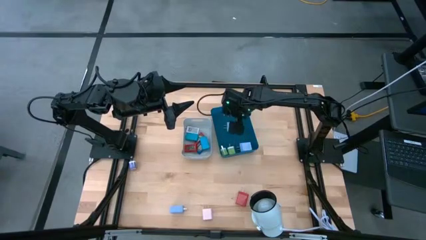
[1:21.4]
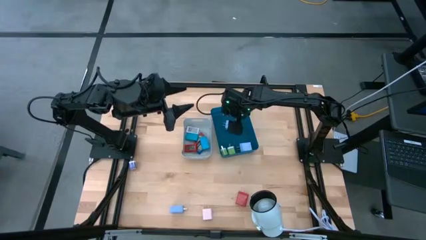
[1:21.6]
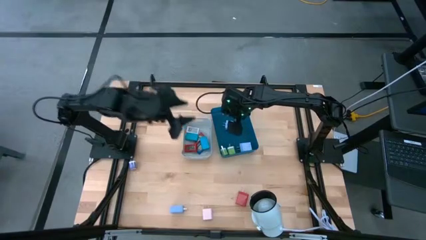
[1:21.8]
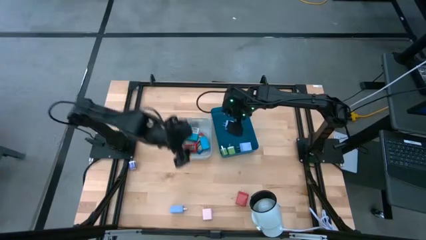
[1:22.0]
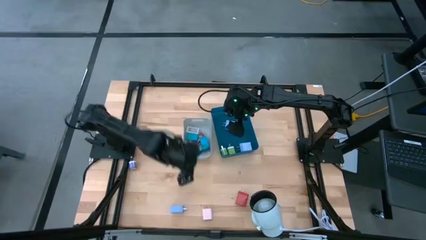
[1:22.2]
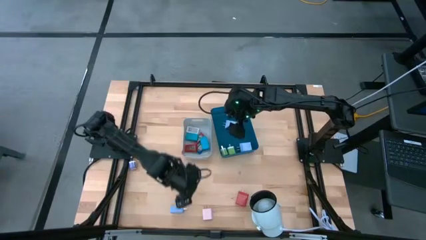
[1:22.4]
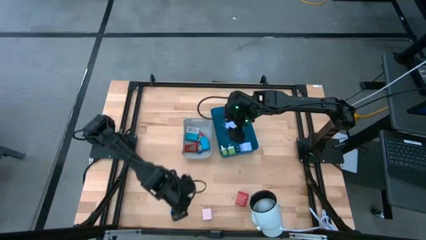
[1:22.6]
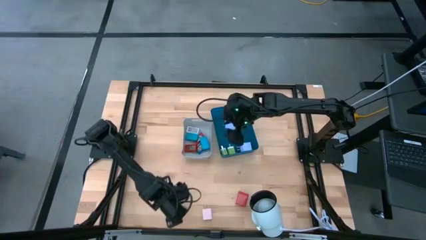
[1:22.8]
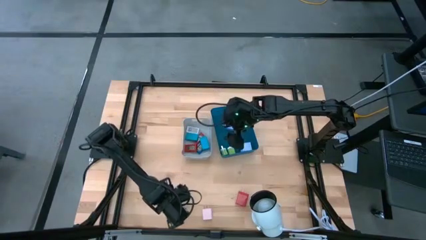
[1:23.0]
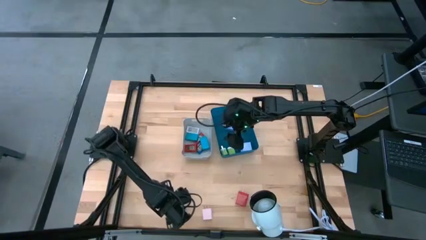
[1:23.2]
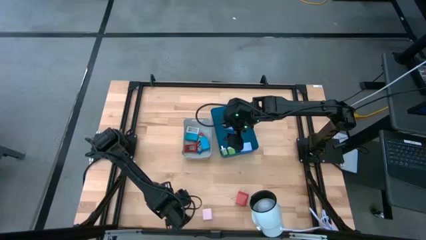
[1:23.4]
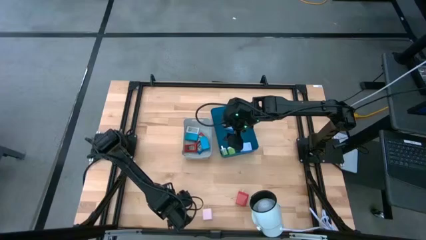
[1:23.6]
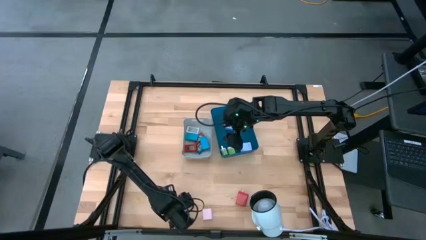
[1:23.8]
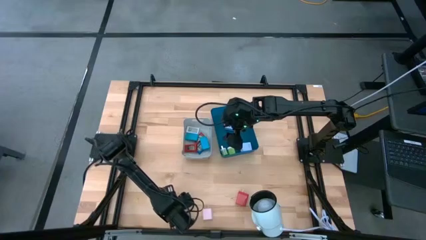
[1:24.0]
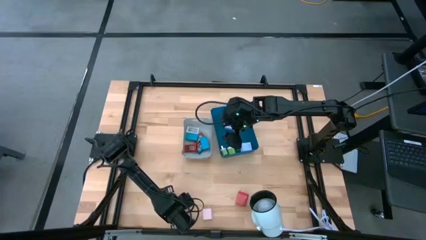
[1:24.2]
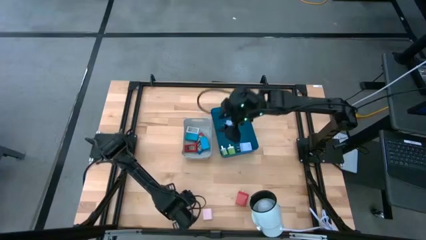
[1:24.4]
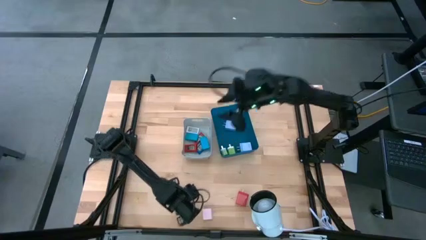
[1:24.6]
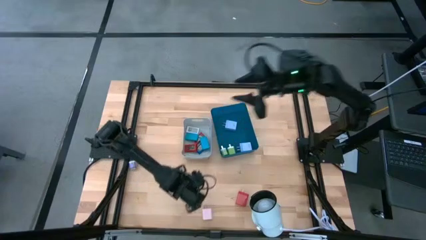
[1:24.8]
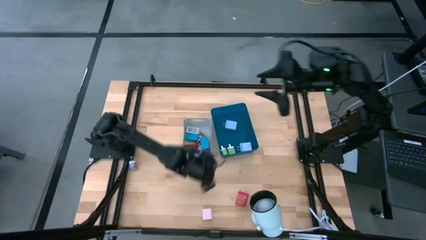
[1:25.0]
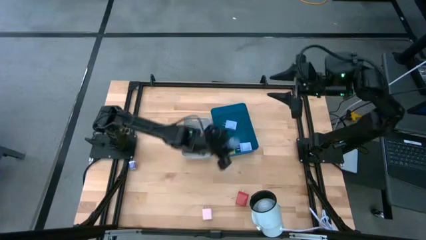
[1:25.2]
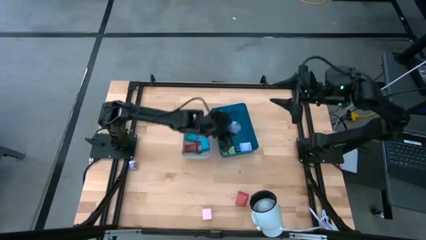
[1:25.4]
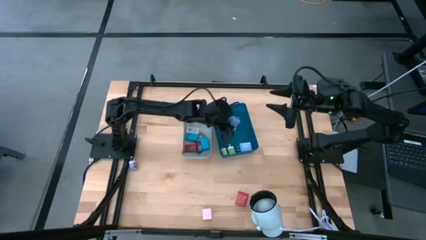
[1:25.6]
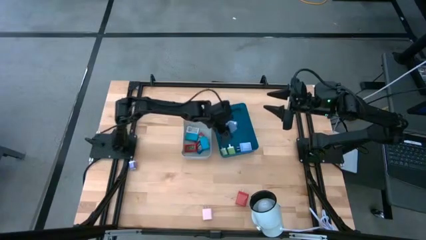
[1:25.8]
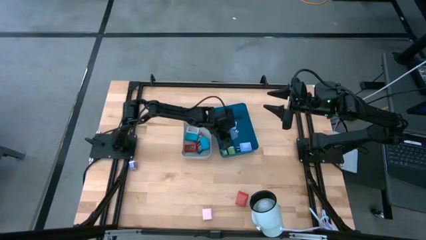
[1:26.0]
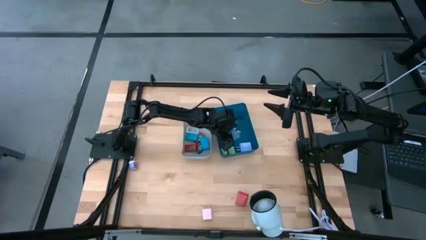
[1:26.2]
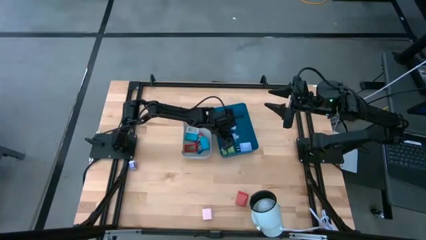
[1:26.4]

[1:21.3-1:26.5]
Task: Pick & Place Office items
Put the light blue charger adapter into the blue bin

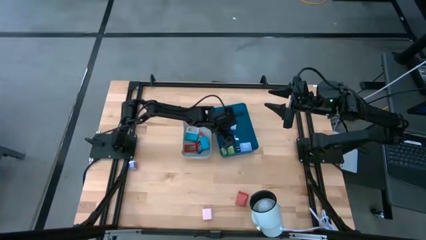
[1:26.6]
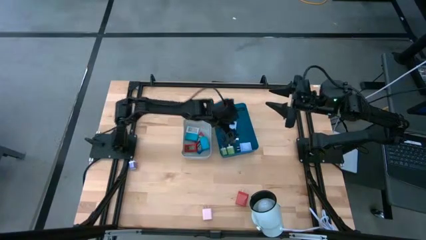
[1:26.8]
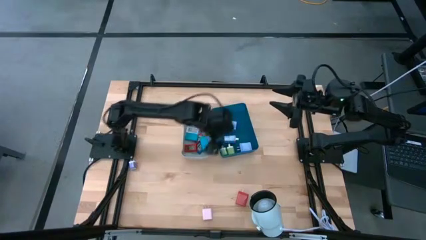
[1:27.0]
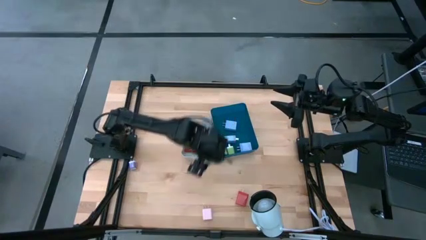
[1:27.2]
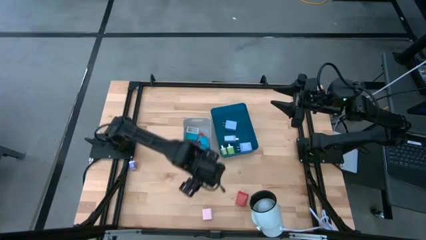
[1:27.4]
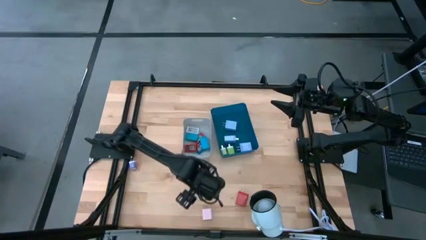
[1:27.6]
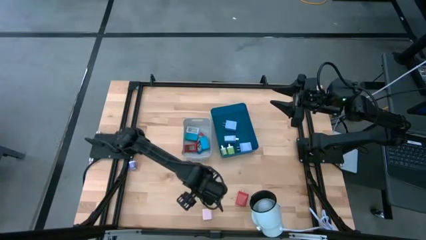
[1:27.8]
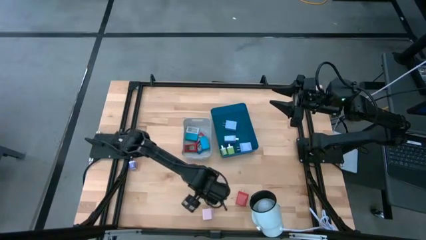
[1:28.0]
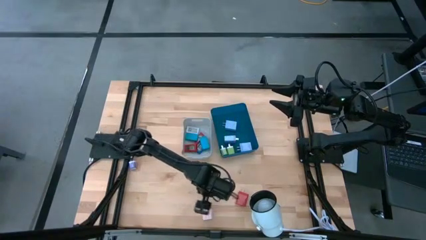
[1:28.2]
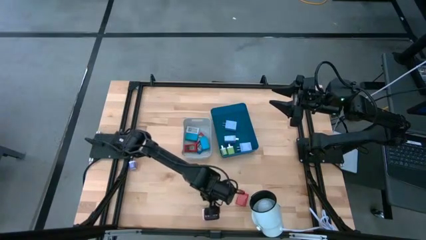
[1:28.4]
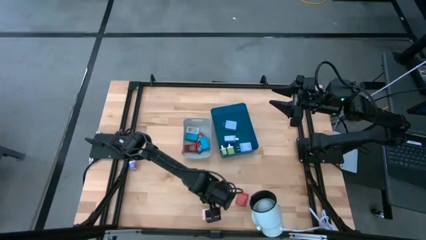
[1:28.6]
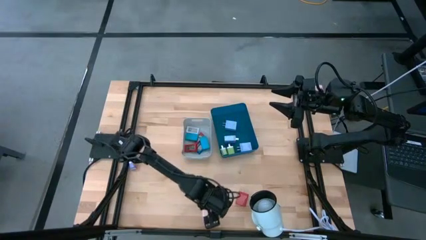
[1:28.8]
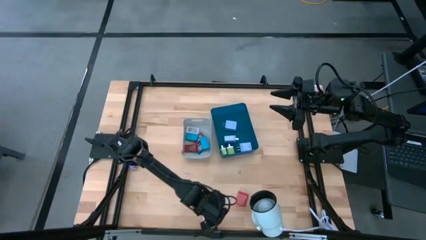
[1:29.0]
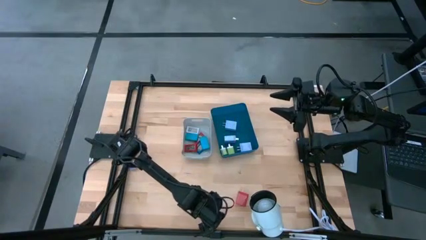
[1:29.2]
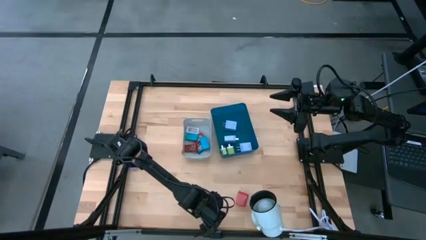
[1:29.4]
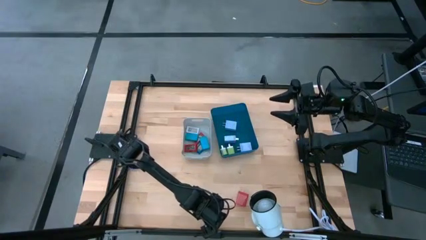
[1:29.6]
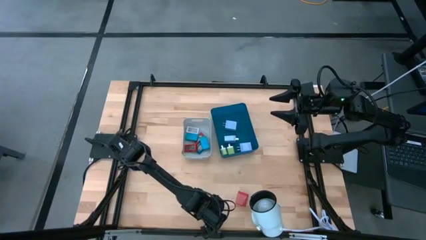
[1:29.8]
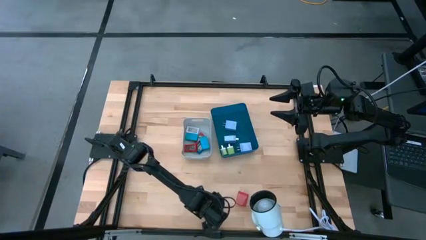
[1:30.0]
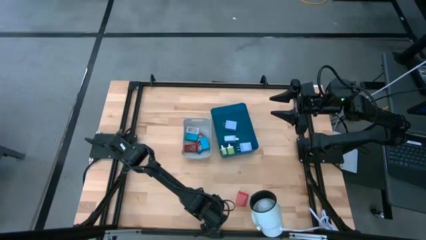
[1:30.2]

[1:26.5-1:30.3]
Put the pink charger adapter into the blue bin

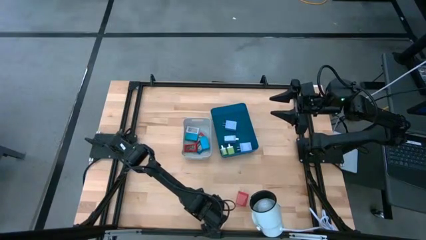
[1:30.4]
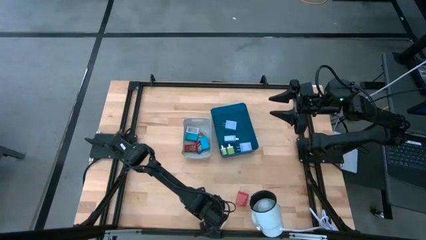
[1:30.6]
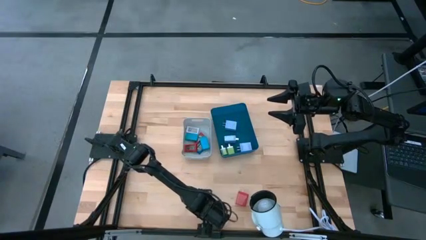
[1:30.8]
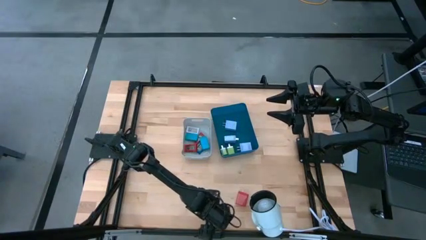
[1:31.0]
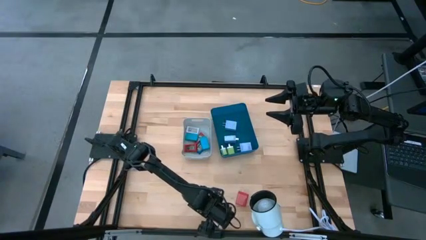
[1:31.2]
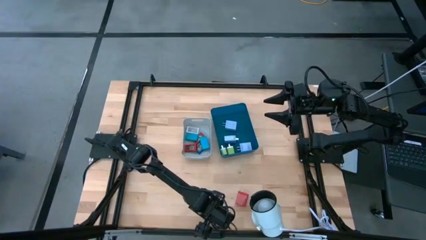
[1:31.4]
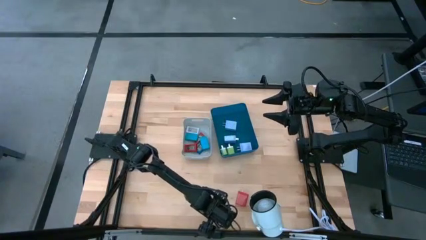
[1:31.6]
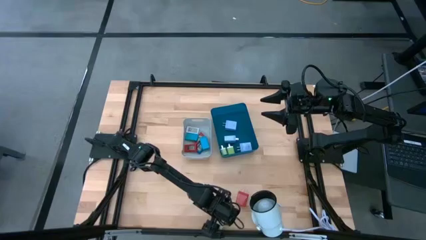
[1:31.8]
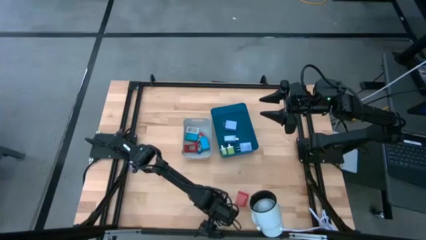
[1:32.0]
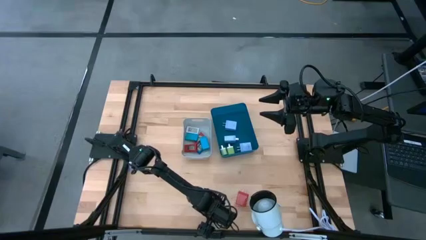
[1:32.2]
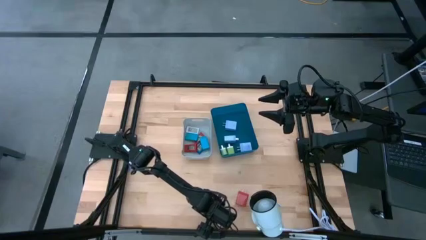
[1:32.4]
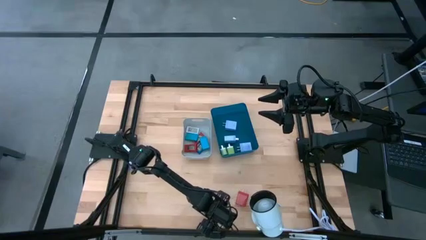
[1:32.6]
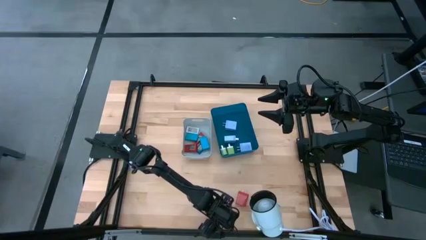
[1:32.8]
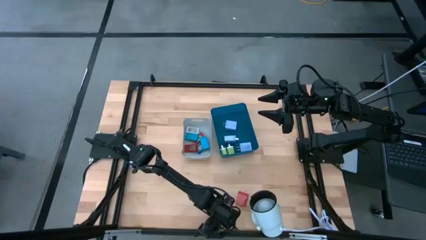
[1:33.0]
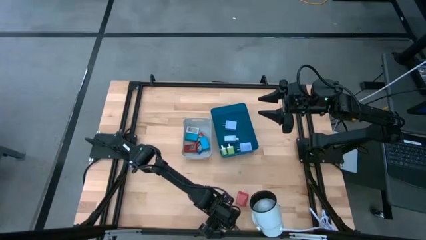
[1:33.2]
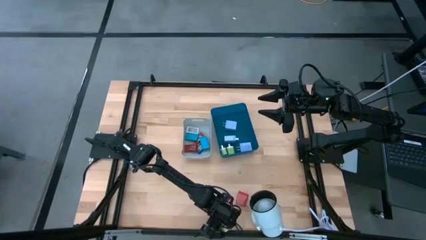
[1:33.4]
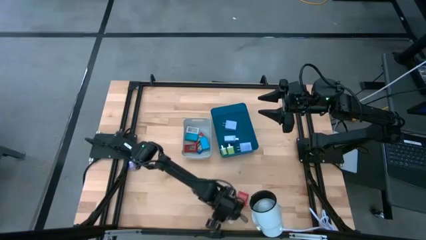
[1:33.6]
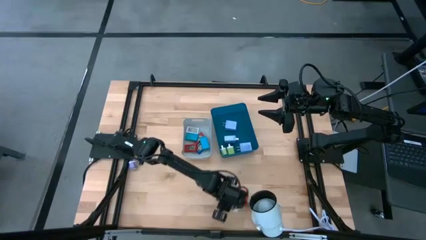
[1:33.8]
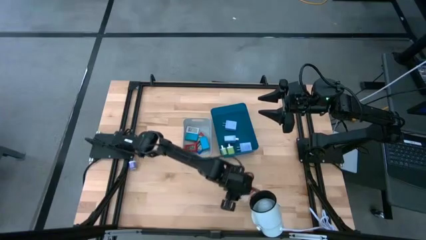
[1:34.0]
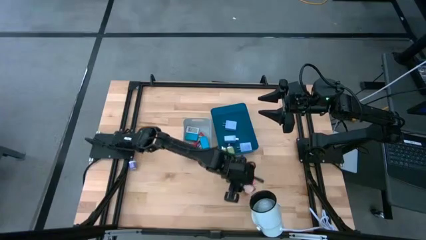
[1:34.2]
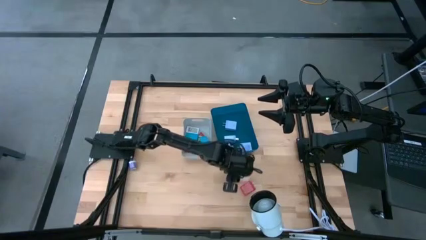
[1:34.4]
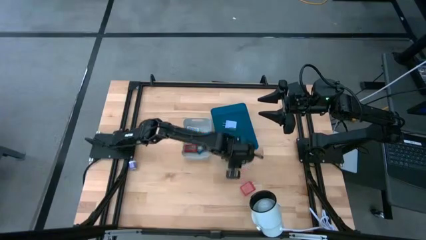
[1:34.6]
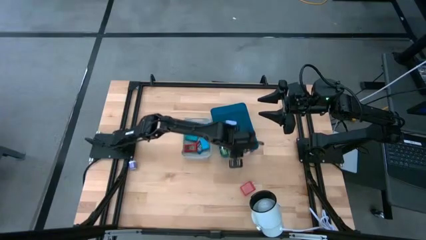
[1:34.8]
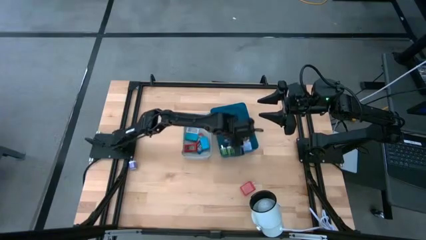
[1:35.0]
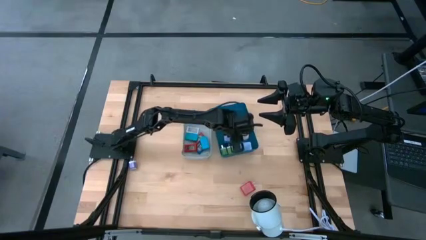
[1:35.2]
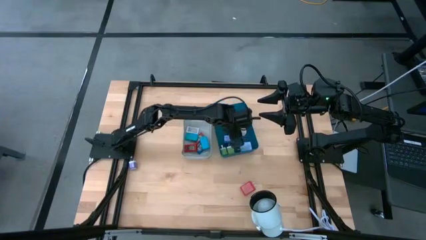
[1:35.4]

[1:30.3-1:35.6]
Put the pink charger adapter into the blue bin

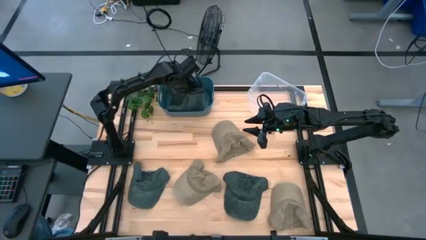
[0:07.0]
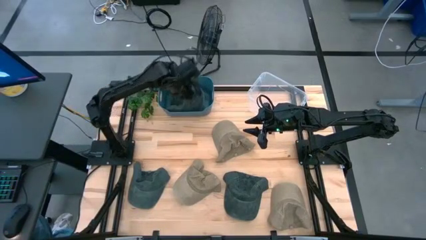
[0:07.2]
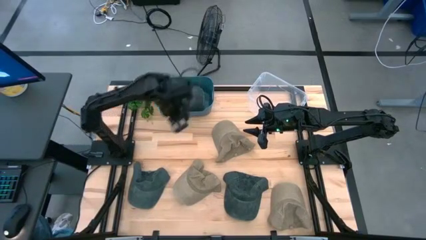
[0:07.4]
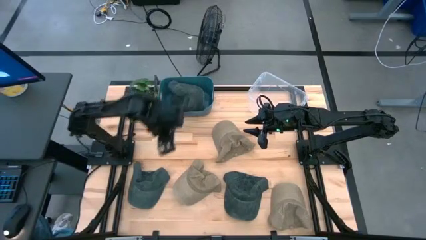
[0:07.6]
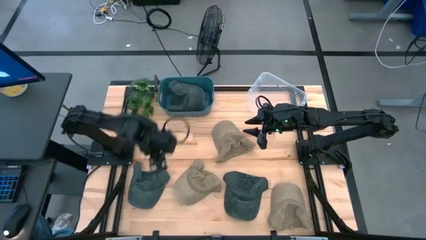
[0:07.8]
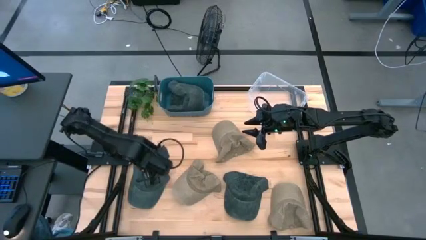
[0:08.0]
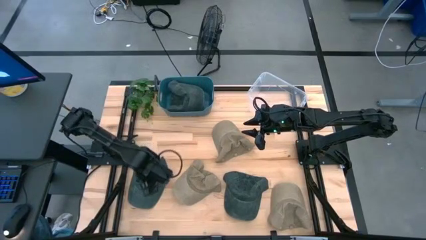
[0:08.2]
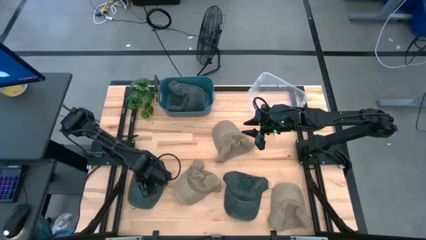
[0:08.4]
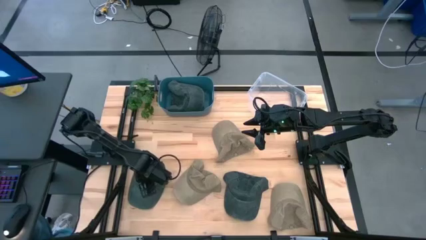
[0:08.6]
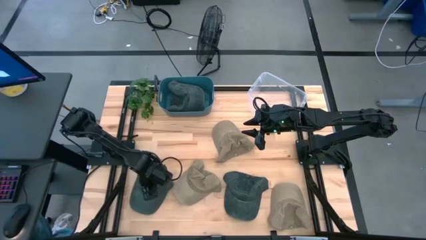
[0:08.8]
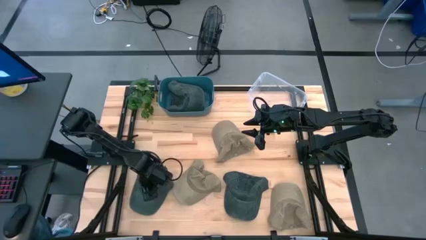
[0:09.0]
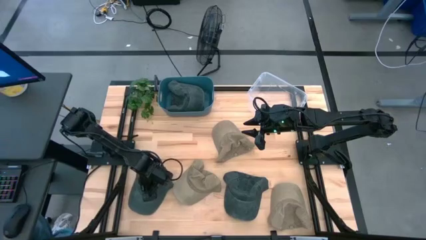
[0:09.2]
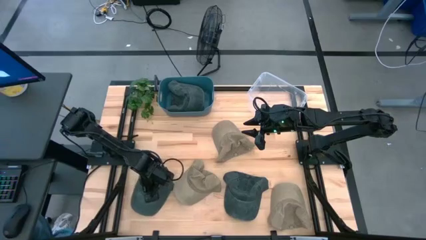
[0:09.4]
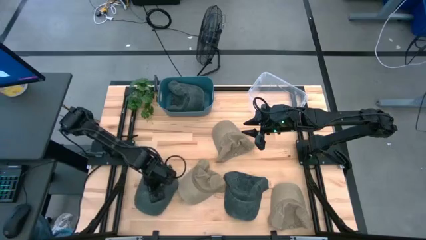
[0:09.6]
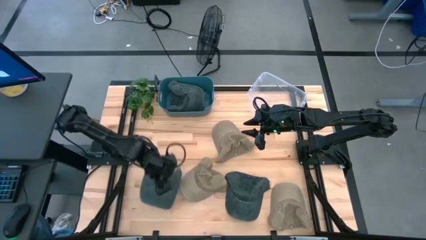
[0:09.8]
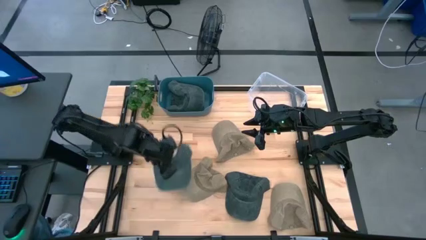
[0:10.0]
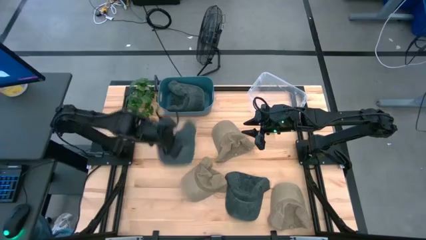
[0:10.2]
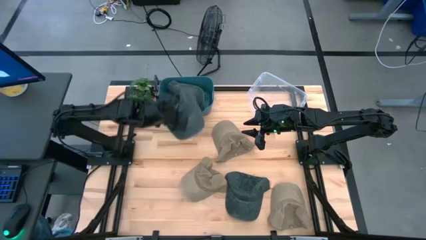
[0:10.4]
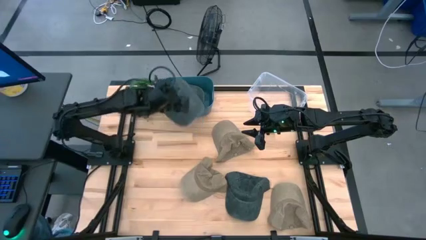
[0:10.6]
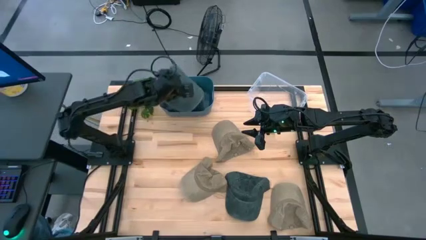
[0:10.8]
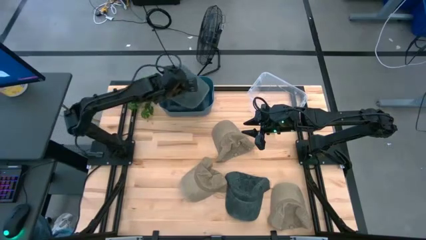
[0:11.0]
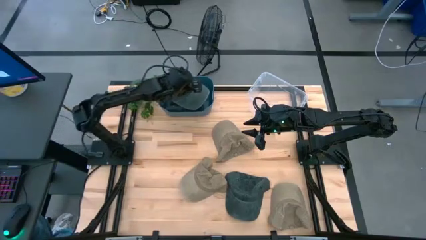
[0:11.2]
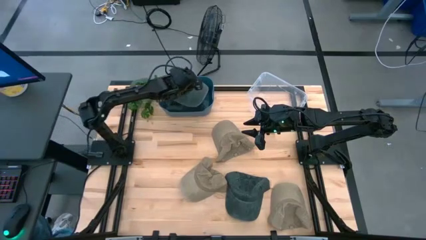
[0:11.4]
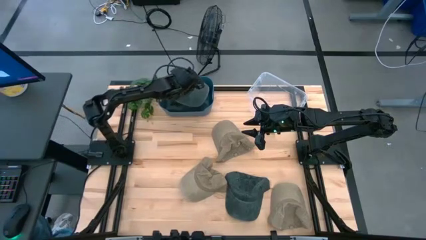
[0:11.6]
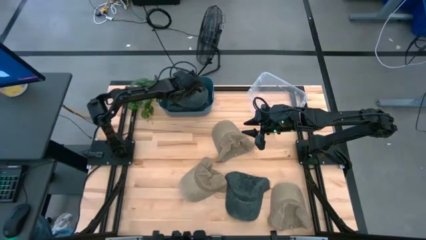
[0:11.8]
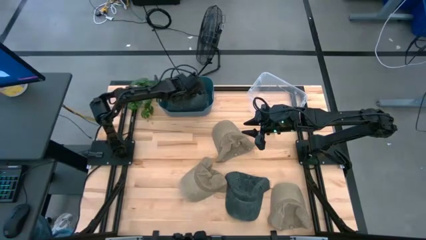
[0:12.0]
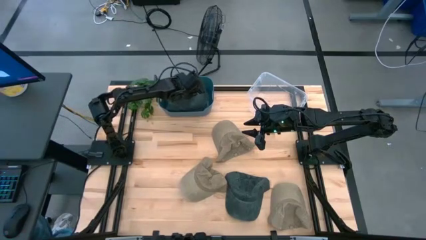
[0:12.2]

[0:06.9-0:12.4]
Task: Pick & Place hat
Put the left blue cap into the blue bin
